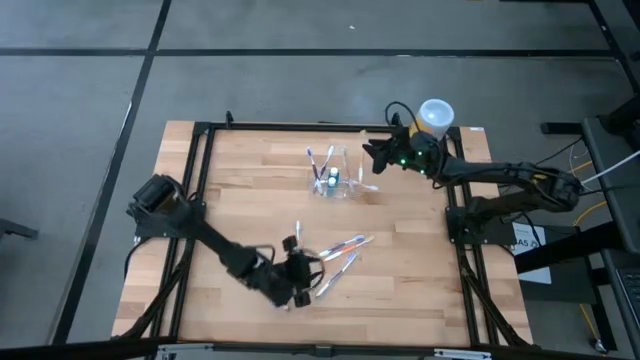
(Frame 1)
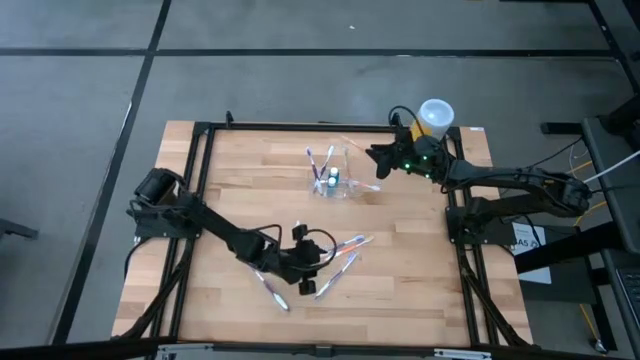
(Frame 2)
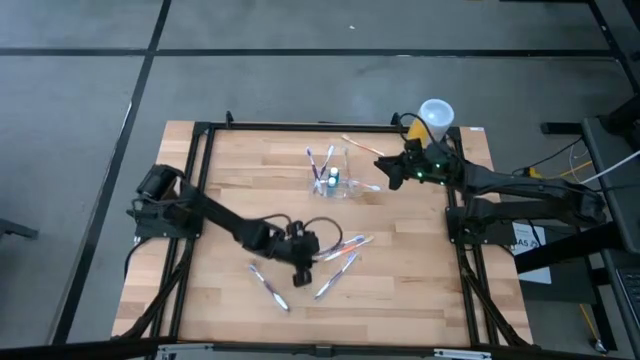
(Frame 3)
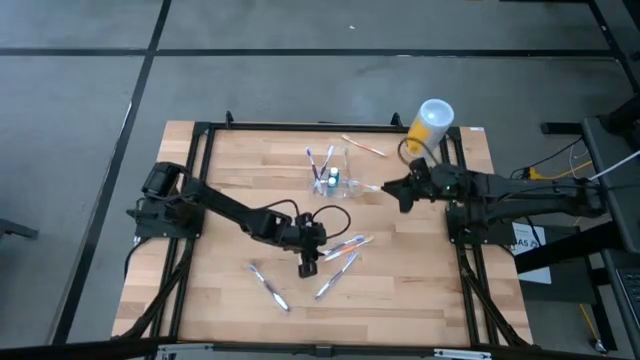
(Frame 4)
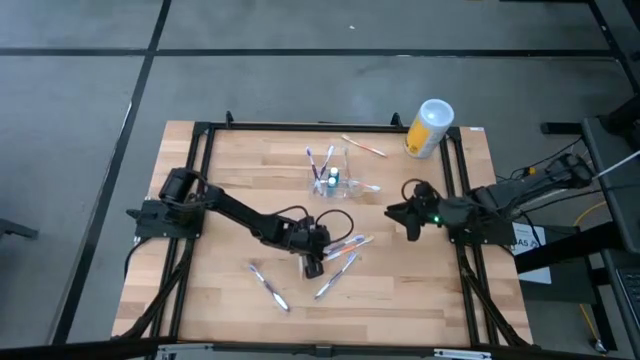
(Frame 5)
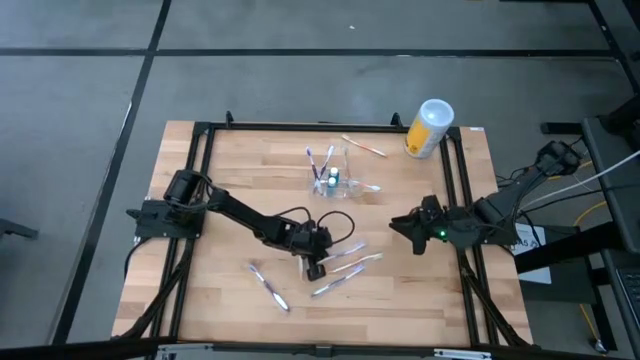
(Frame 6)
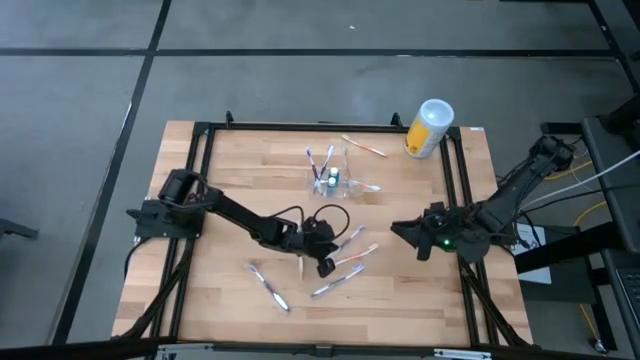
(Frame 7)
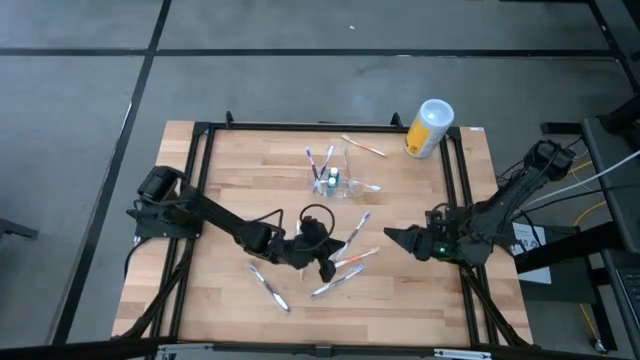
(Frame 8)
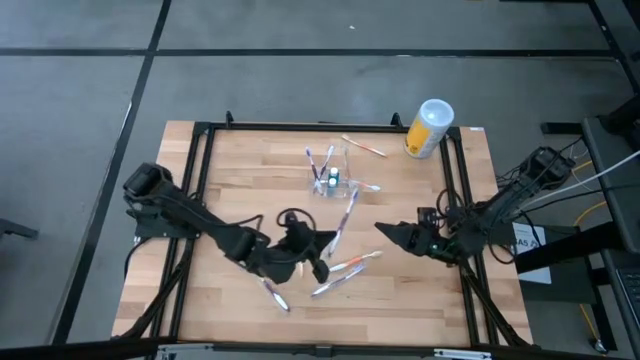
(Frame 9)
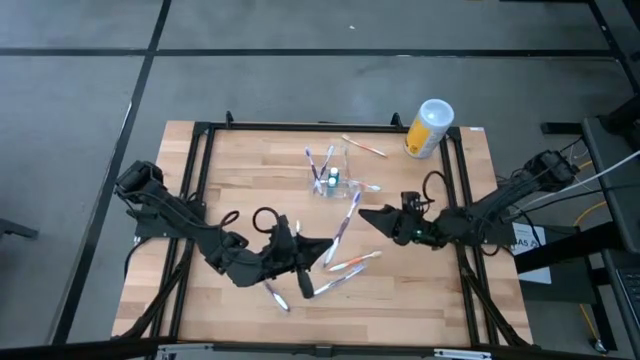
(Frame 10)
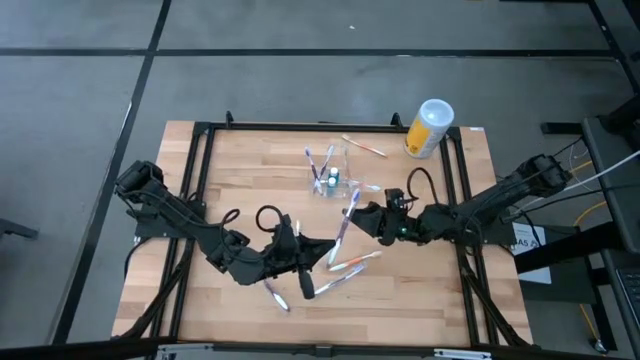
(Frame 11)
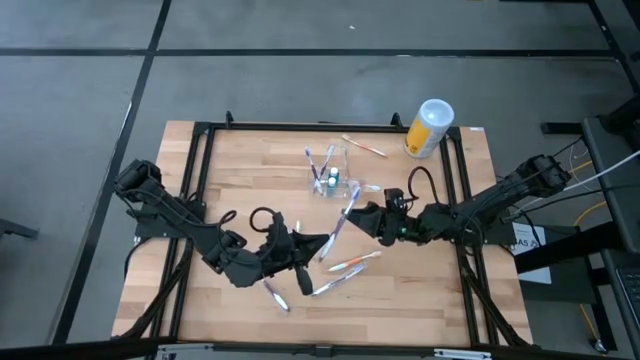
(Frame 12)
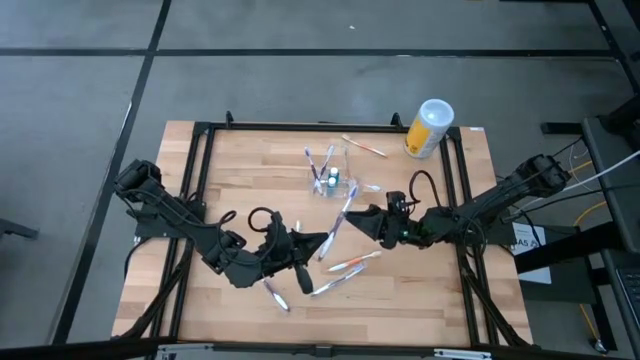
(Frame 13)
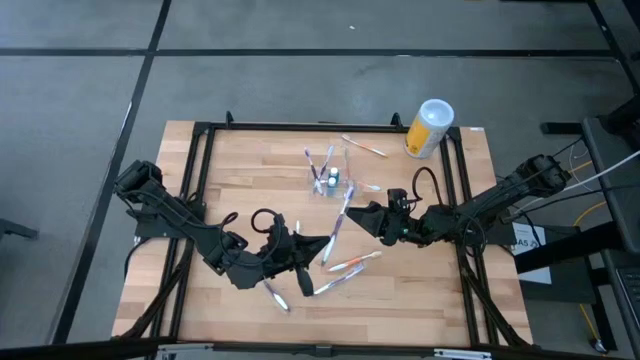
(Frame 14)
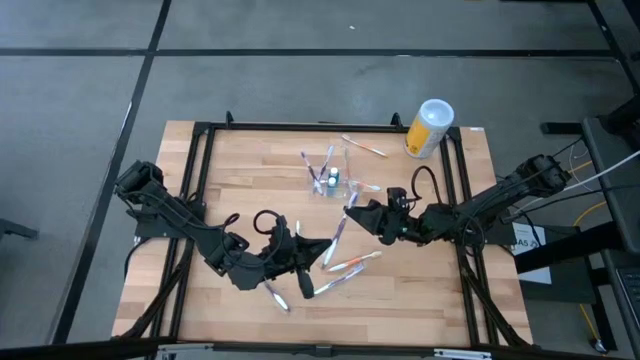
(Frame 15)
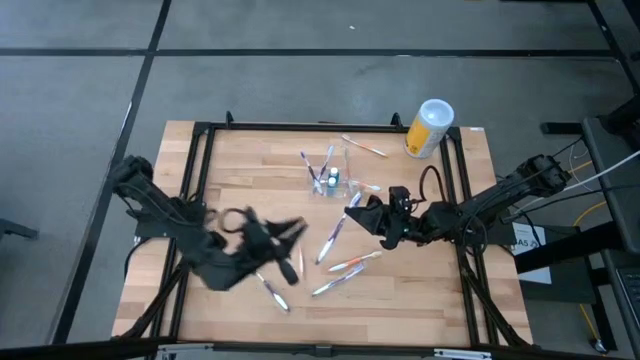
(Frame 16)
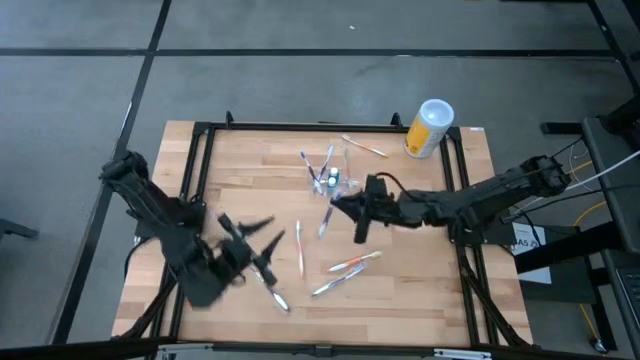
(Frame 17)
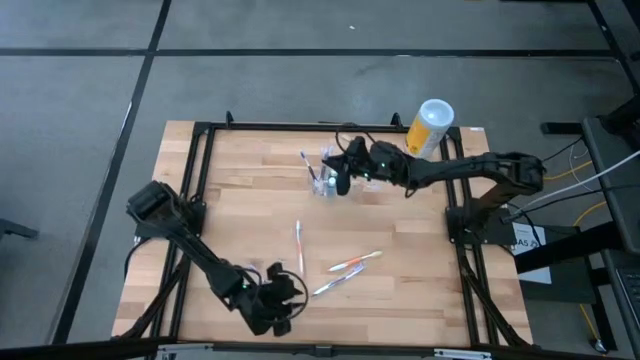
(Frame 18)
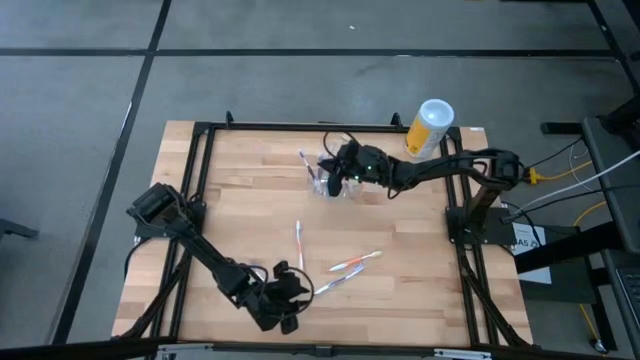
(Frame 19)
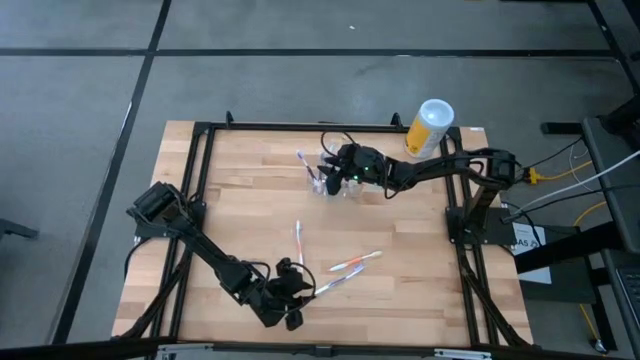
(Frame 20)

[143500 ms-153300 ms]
Task: Pick & Place toothbrushing station
Put the purple toothbrush into the left section of the transparent organizer

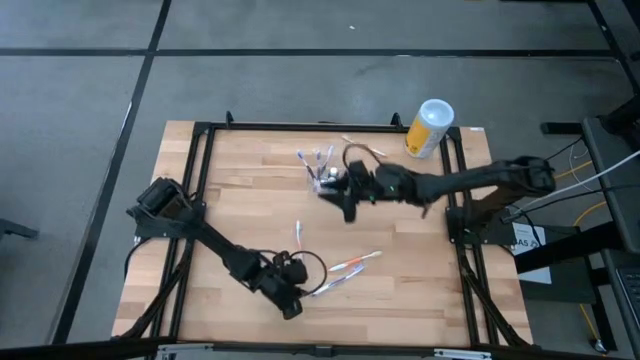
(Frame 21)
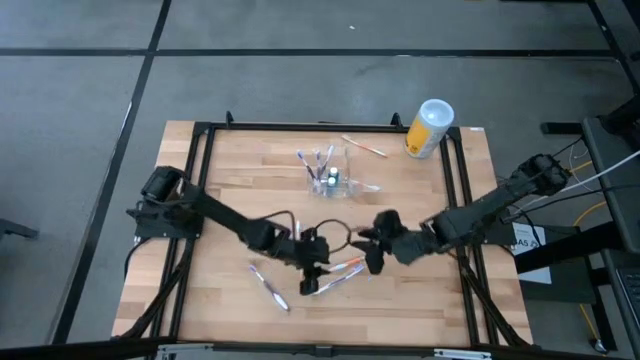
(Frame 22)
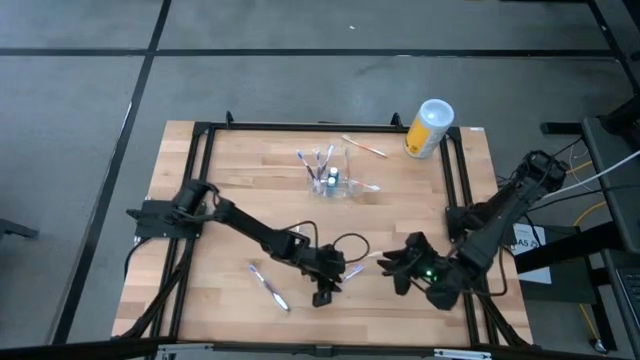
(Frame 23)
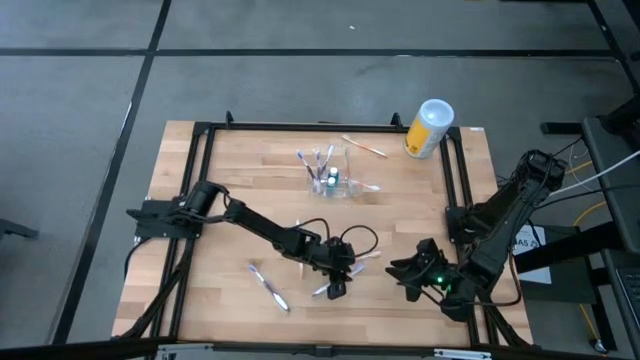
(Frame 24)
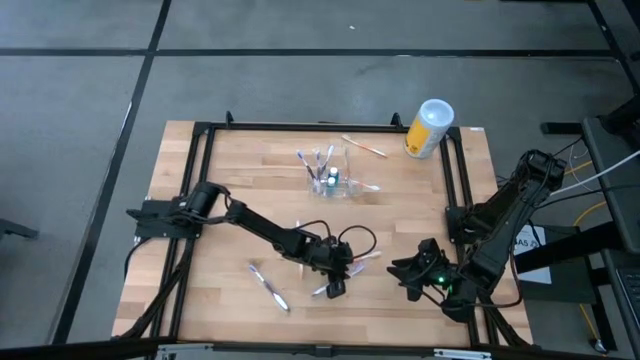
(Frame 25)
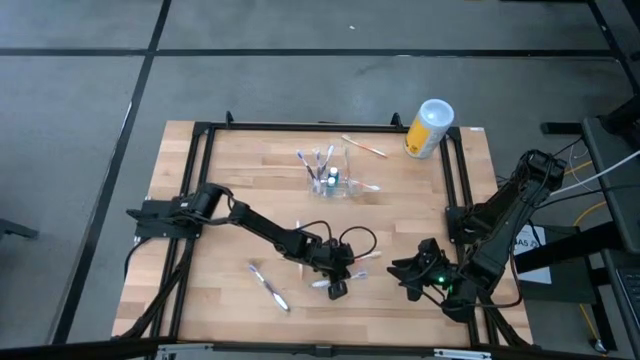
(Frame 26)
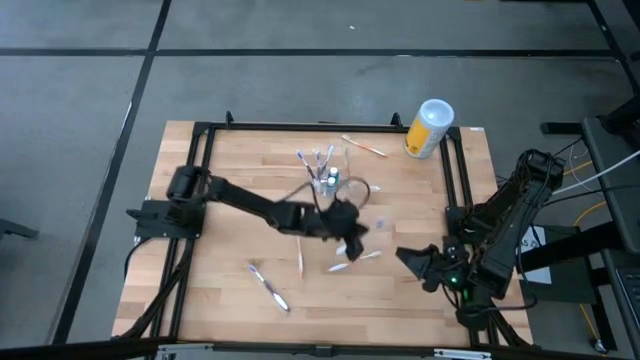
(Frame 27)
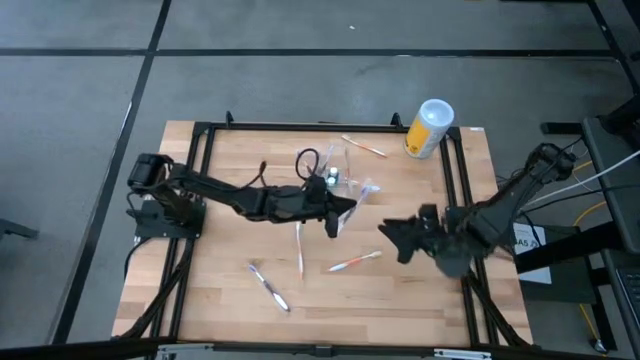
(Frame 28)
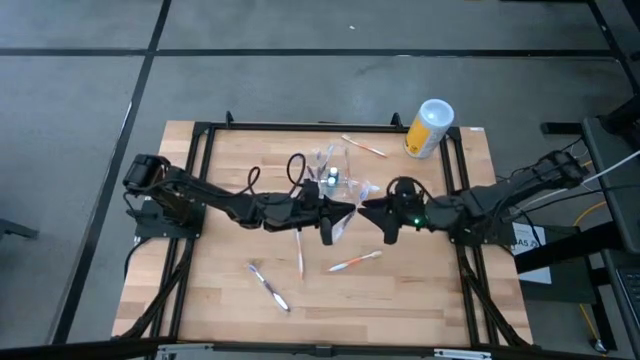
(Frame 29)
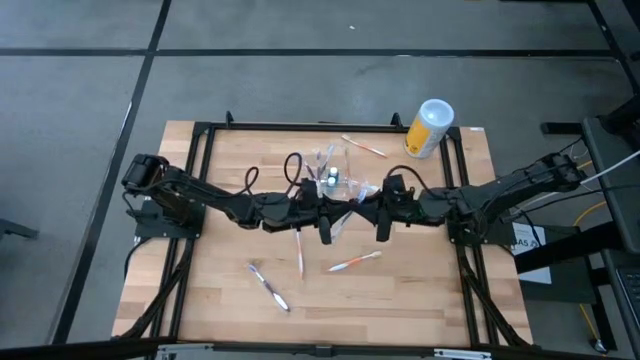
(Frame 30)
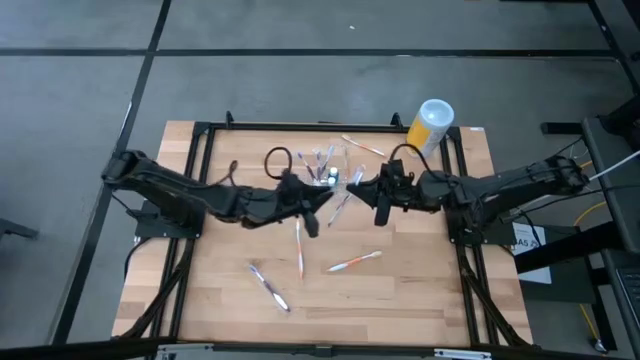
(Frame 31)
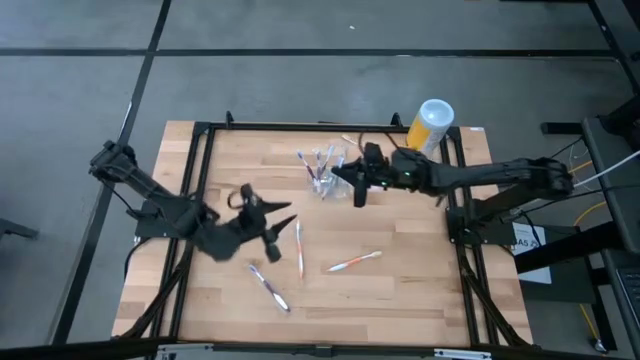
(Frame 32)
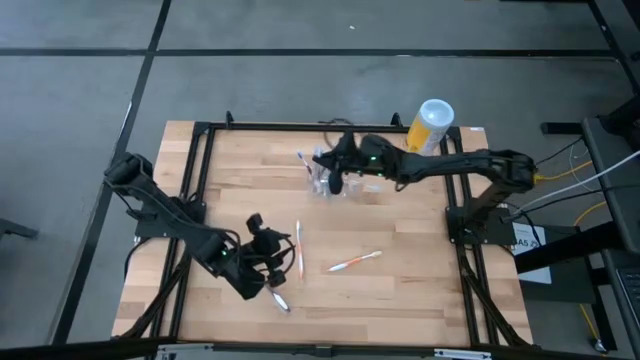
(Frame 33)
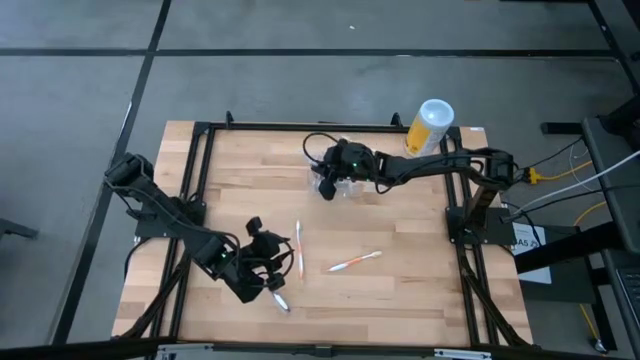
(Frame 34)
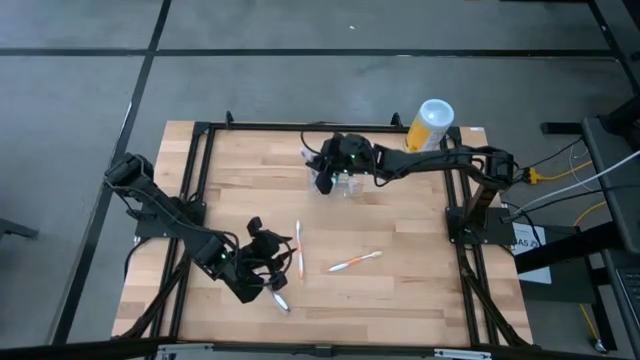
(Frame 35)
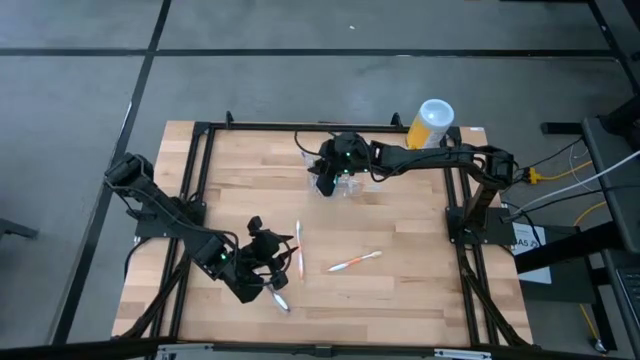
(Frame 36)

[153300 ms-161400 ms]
Put the purple toothbrush into the left section of the transparent organizer

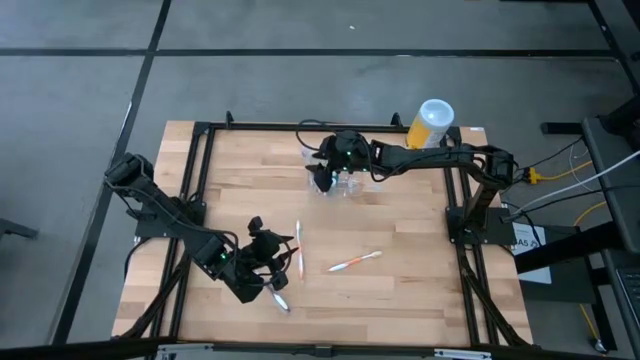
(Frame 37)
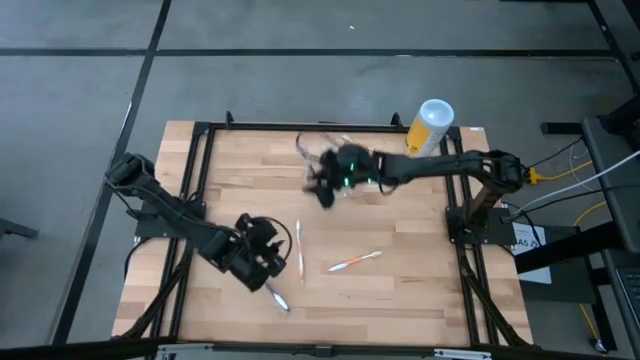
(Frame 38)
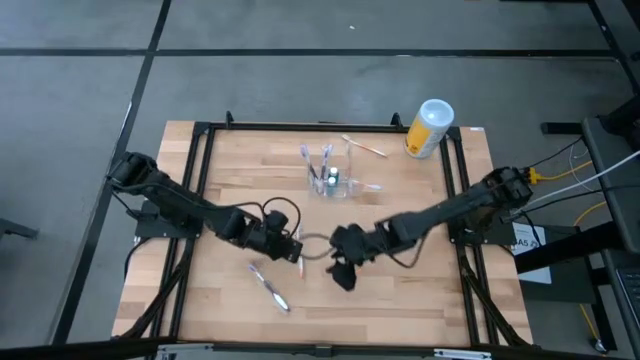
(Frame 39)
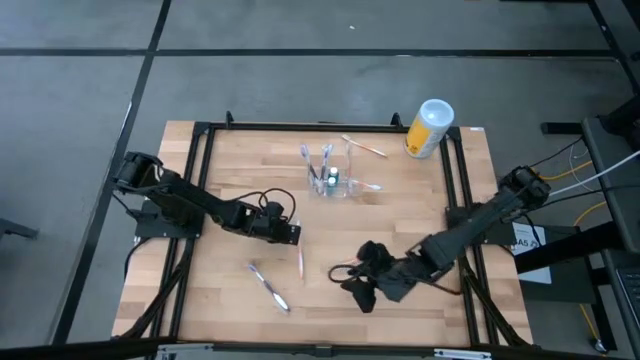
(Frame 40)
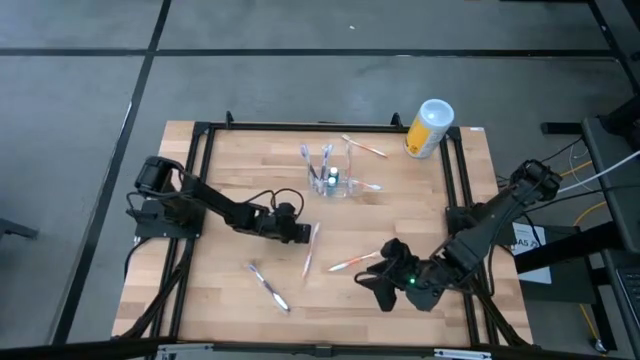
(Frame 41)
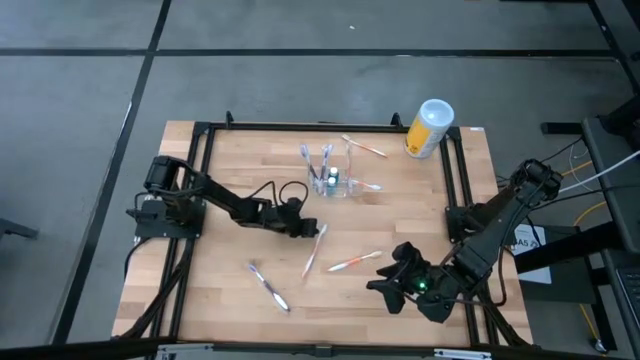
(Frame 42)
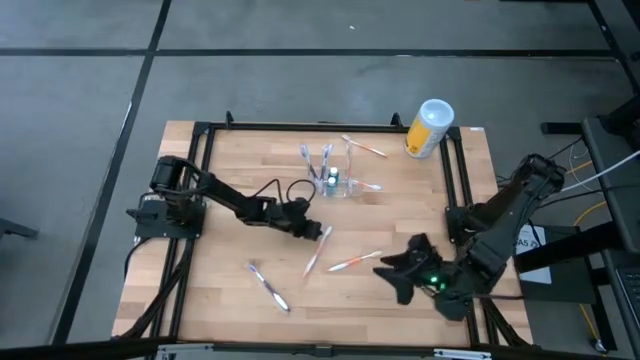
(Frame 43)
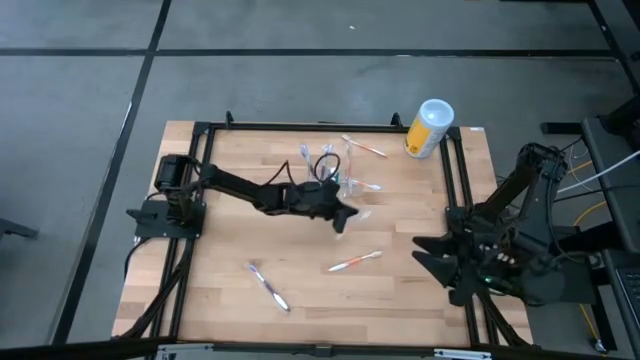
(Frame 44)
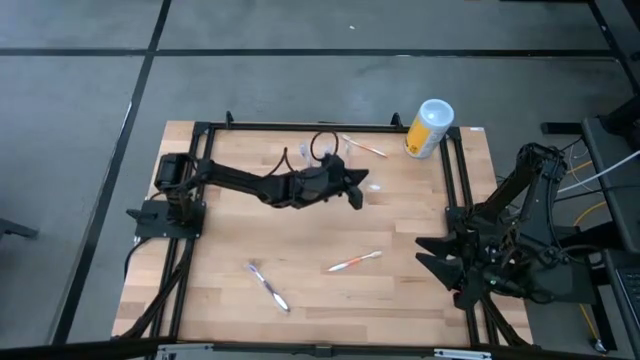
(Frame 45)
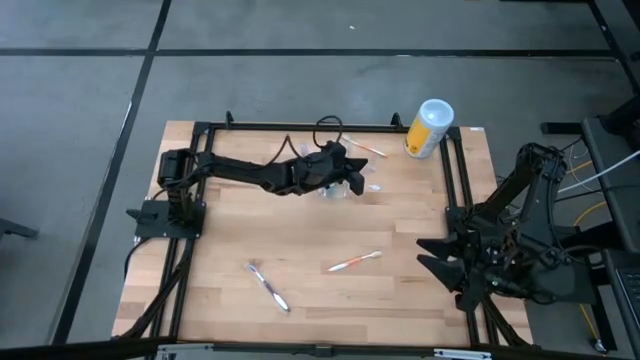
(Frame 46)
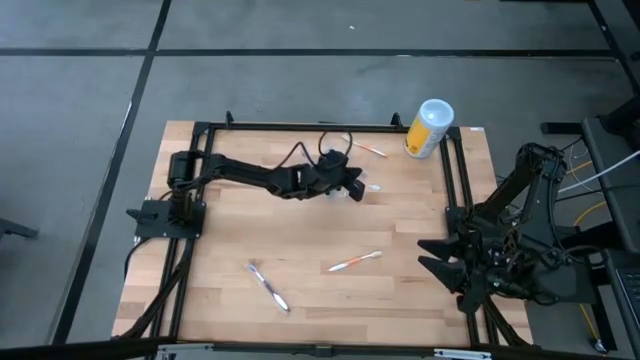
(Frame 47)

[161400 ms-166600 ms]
Put the orange toothbrush into the right section of the transparent organizer
